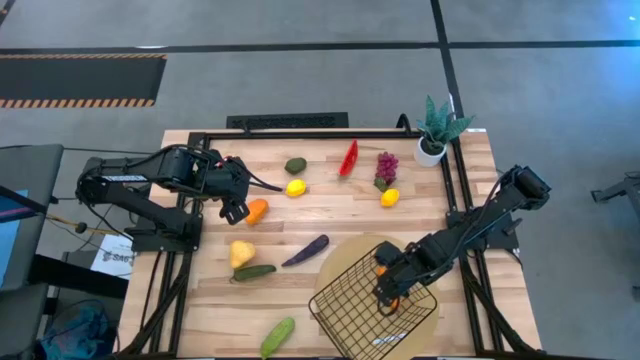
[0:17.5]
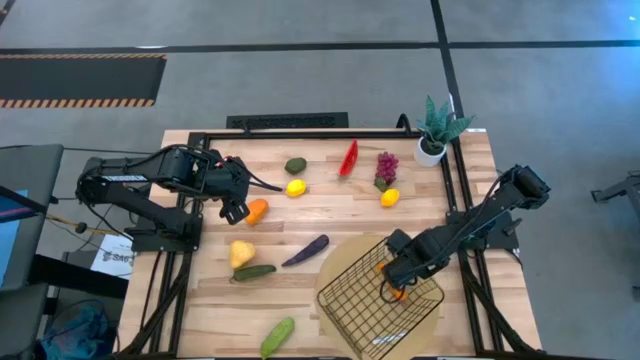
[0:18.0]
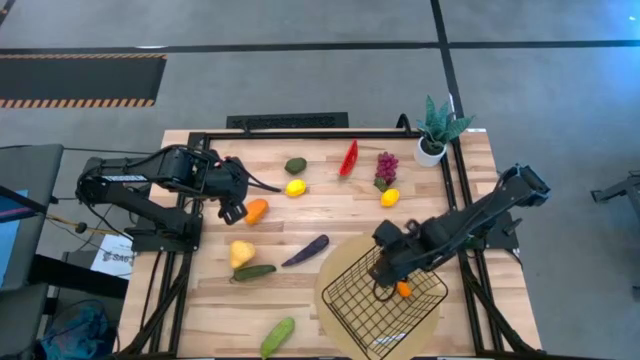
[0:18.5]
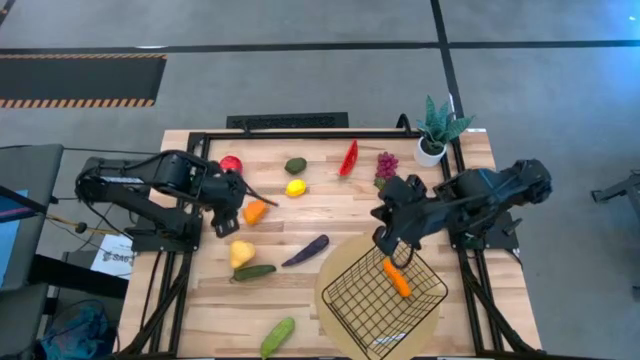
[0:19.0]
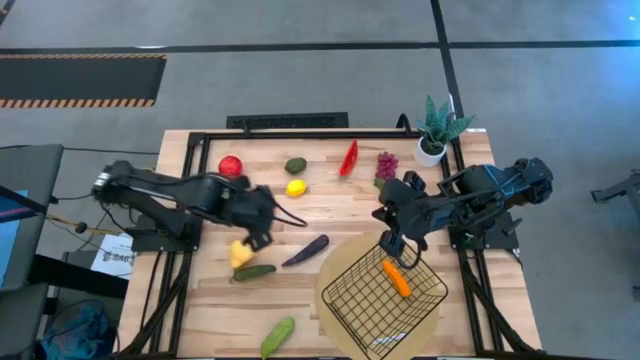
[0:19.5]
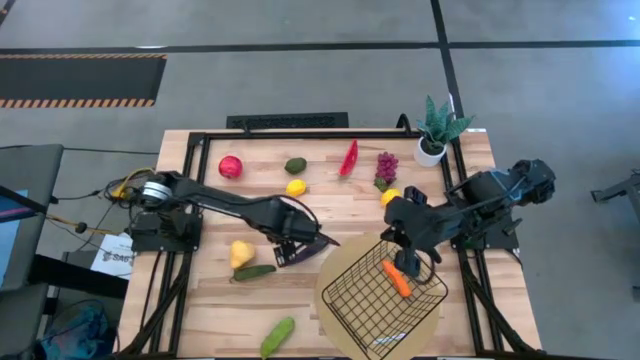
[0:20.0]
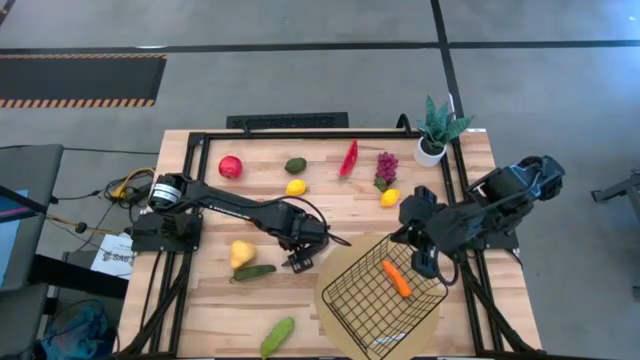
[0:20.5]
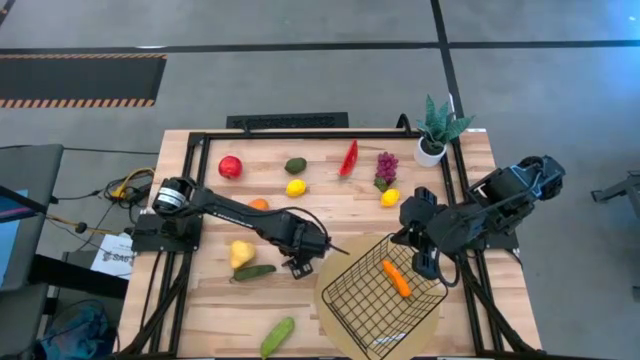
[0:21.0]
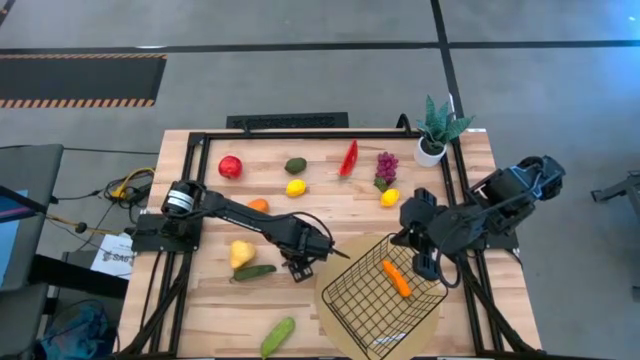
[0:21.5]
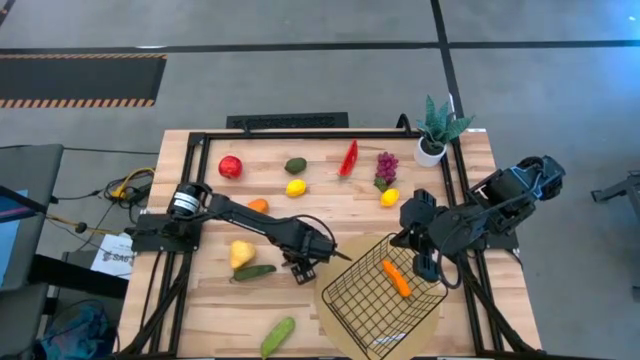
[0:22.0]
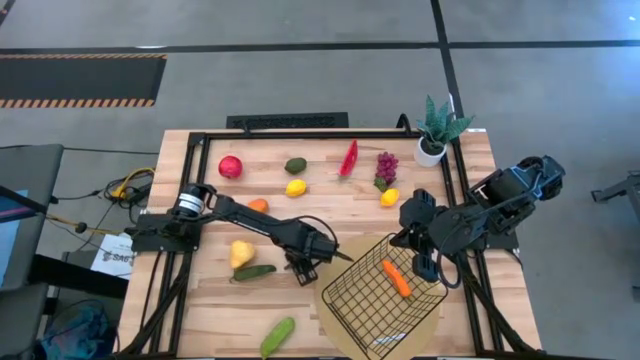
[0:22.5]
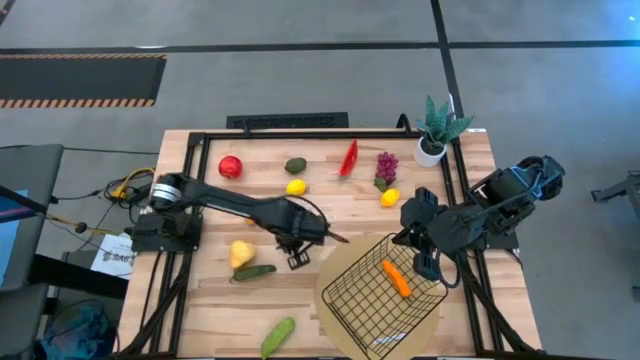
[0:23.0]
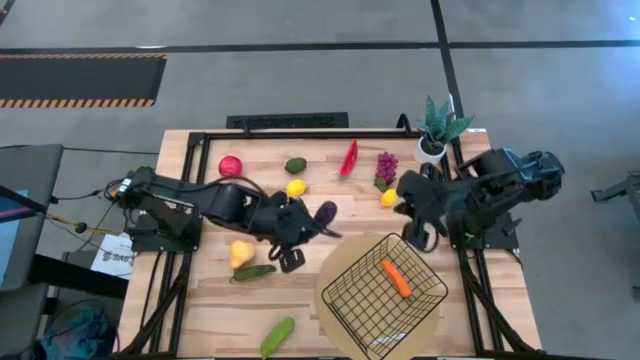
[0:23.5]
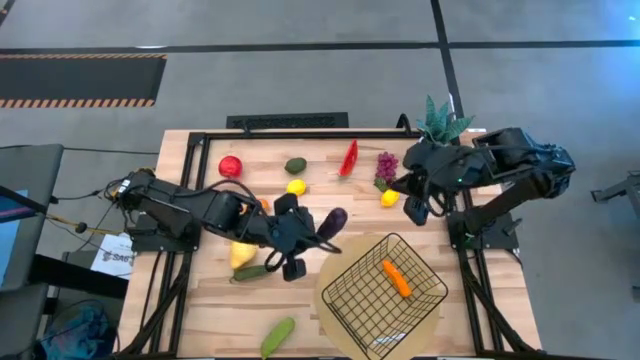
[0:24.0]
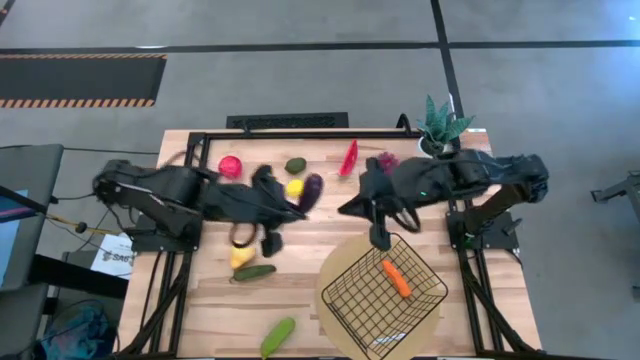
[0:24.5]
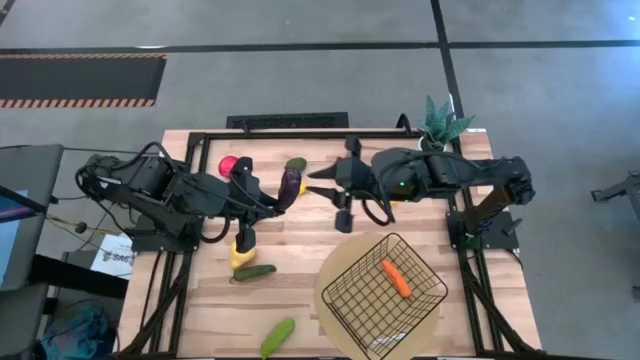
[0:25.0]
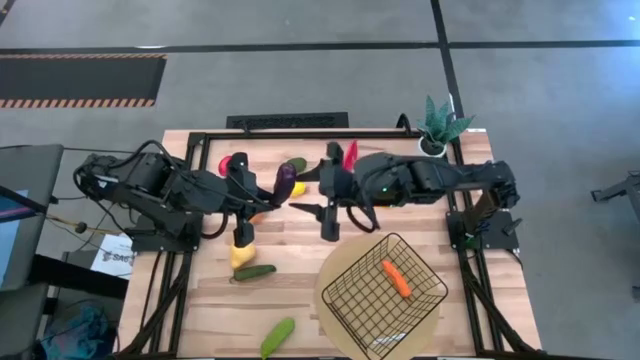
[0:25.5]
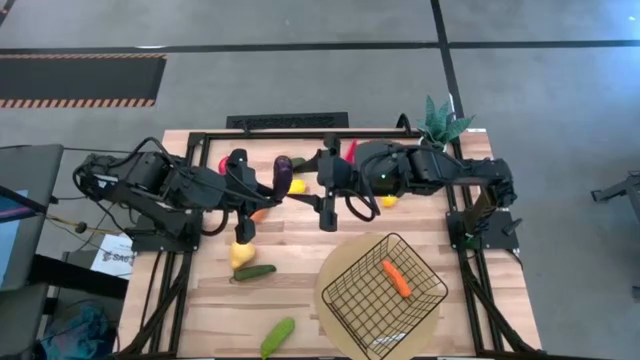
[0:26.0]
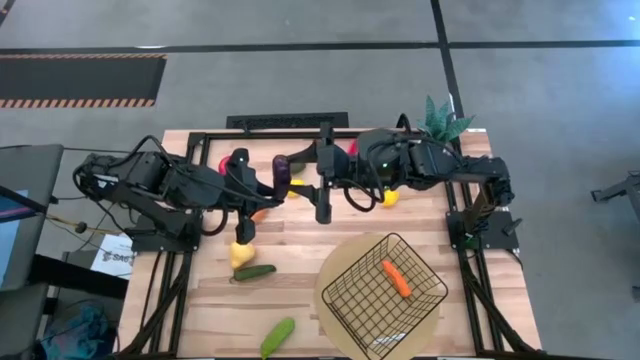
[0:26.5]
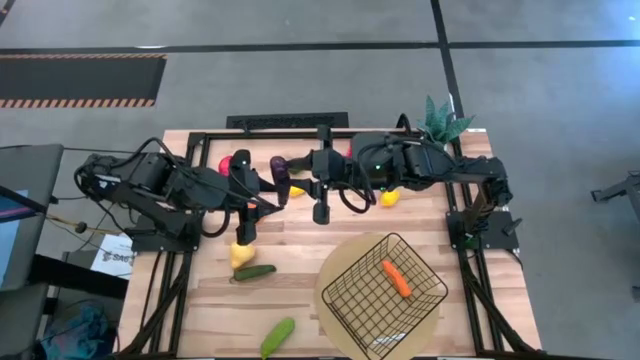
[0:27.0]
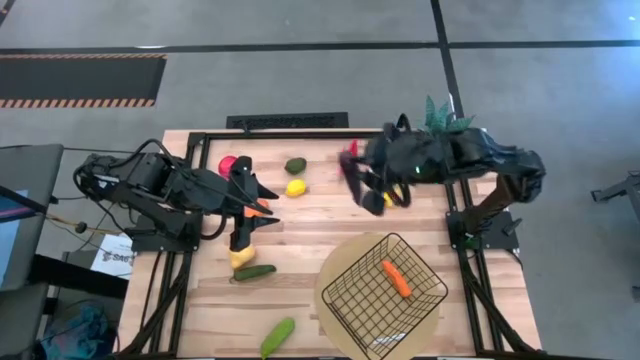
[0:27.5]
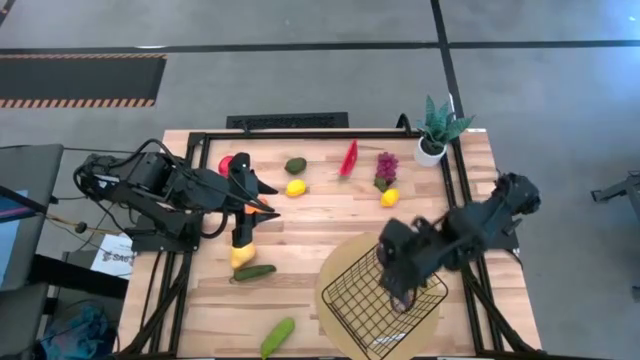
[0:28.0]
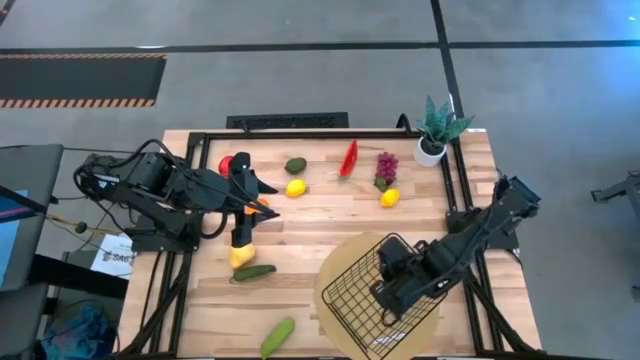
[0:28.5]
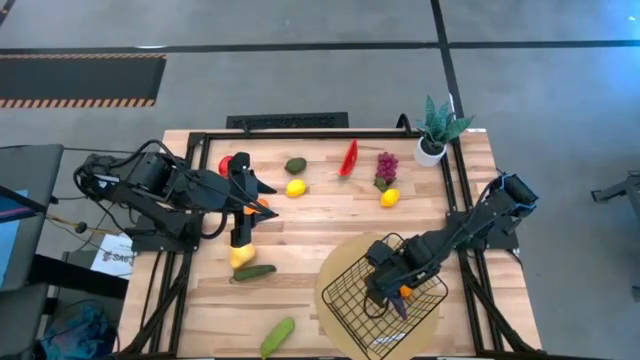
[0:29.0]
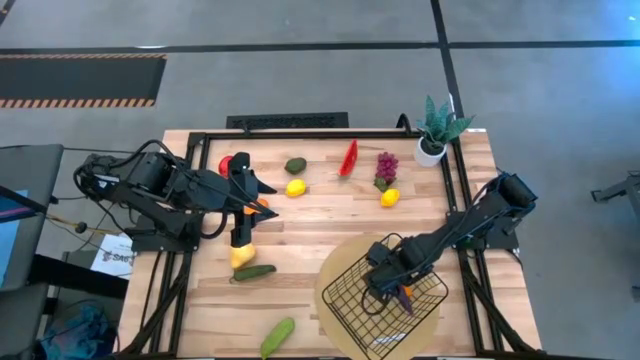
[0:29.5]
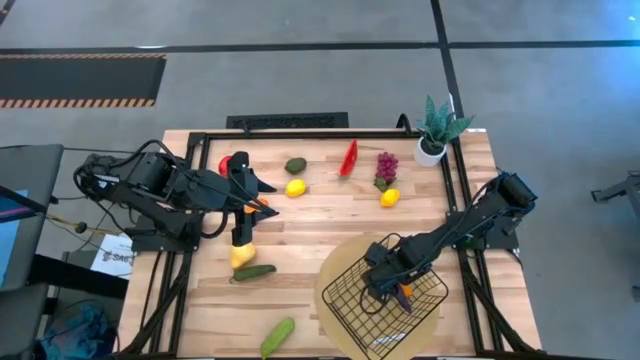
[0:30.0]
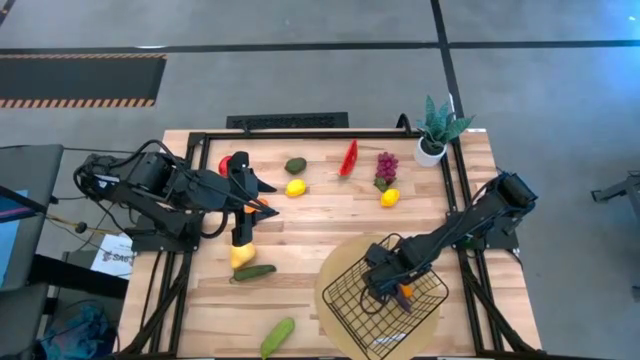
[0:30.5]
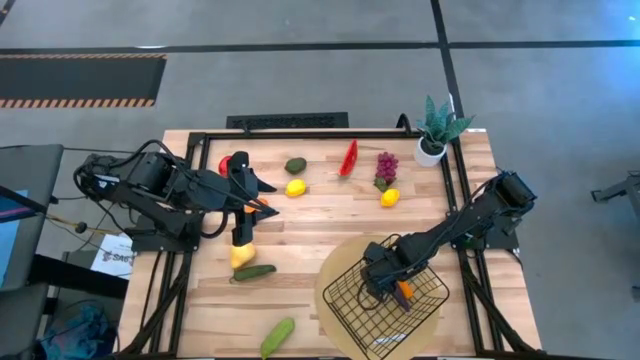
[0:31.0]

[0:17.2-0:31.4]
Task: Build produce basket
Put the eggplant into the mesh basket
